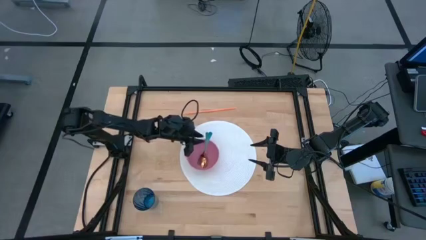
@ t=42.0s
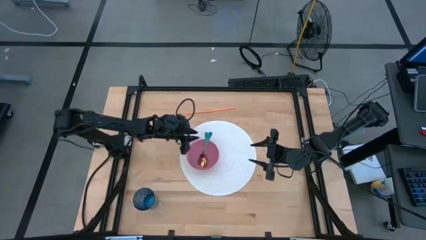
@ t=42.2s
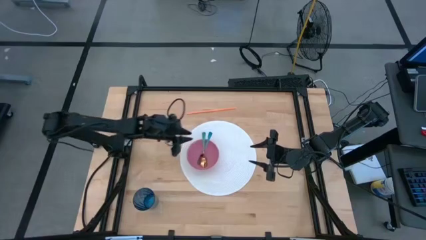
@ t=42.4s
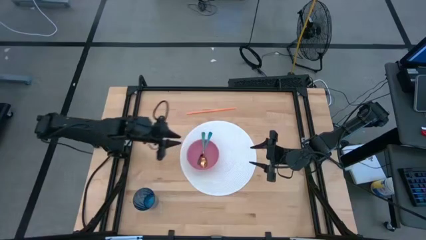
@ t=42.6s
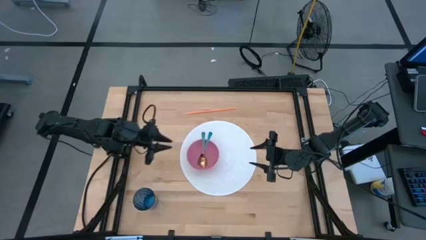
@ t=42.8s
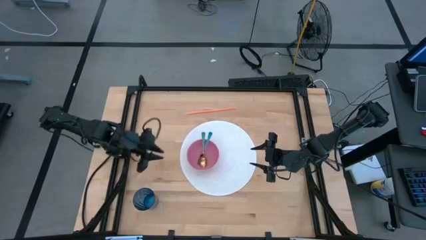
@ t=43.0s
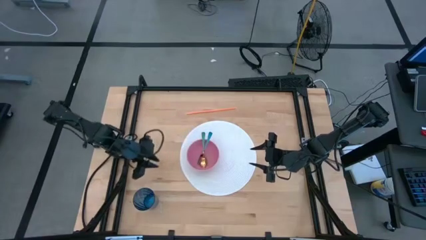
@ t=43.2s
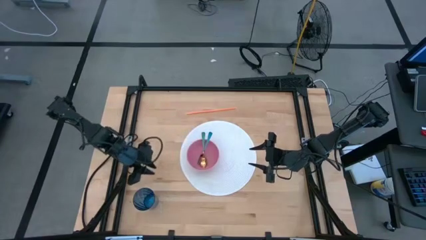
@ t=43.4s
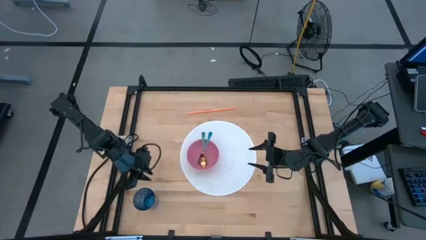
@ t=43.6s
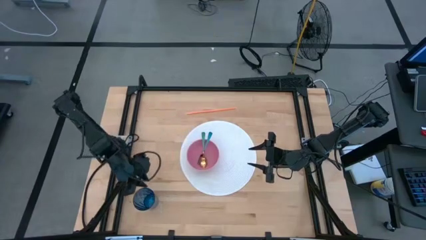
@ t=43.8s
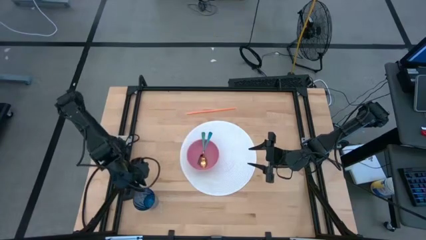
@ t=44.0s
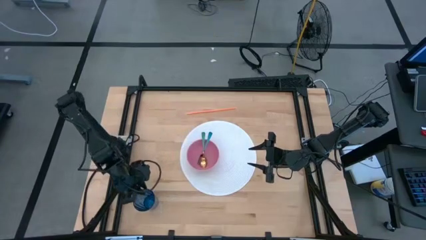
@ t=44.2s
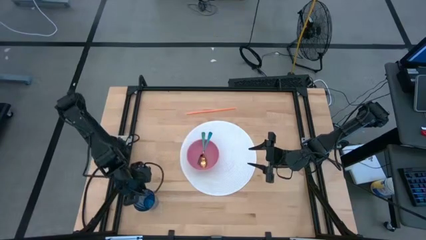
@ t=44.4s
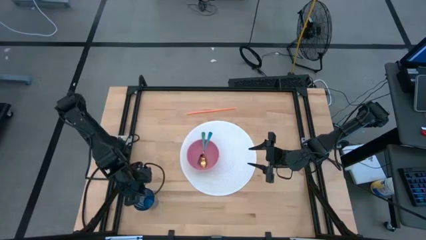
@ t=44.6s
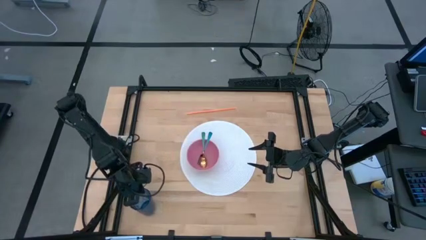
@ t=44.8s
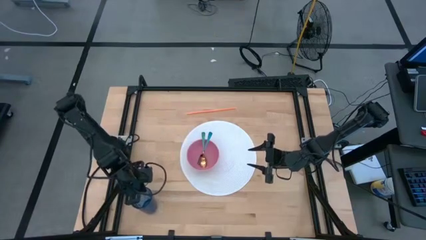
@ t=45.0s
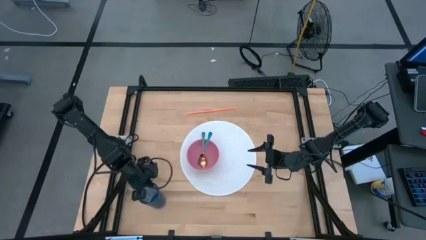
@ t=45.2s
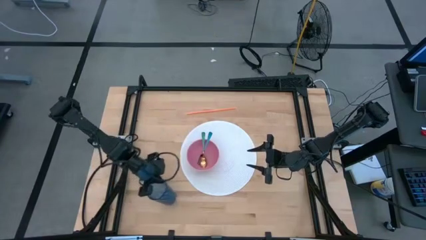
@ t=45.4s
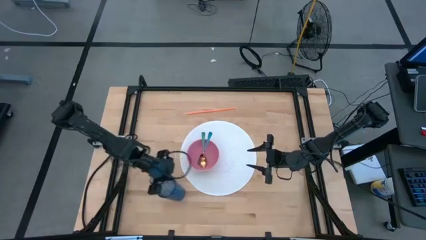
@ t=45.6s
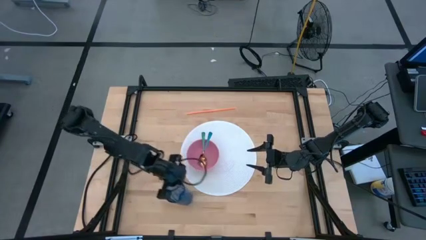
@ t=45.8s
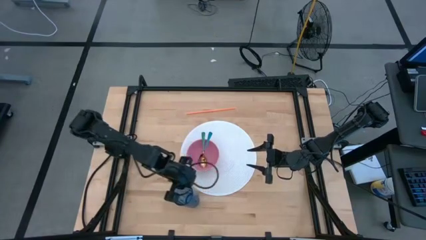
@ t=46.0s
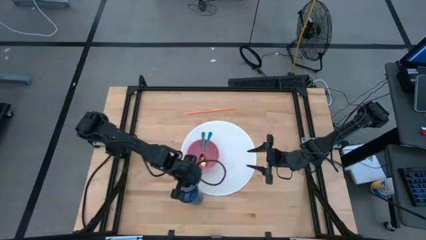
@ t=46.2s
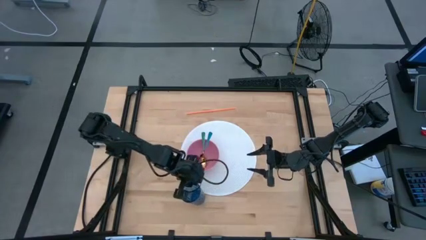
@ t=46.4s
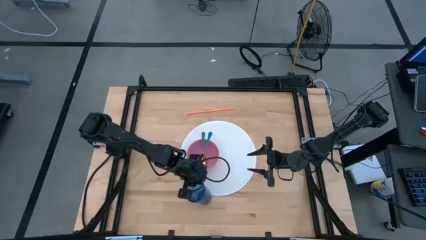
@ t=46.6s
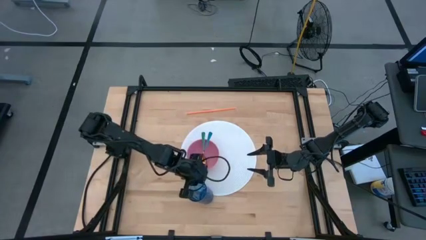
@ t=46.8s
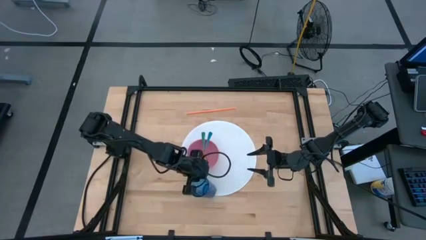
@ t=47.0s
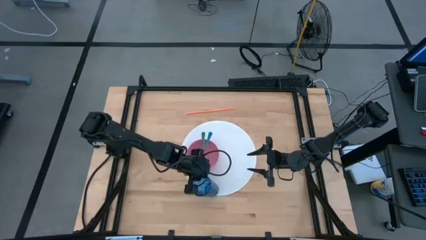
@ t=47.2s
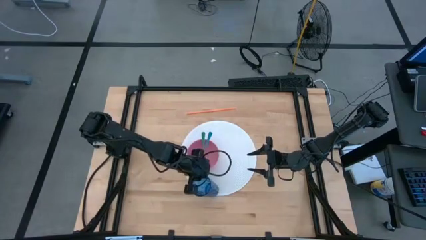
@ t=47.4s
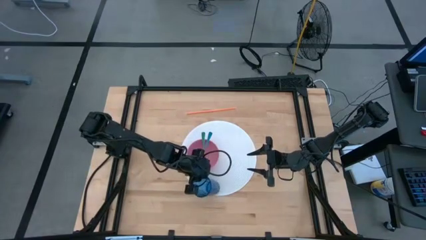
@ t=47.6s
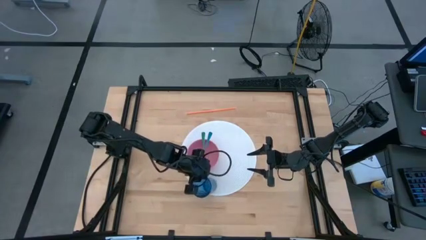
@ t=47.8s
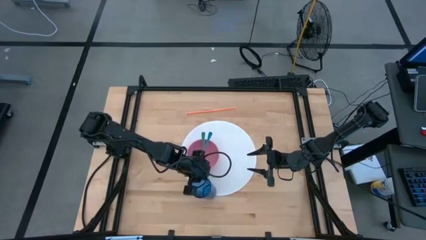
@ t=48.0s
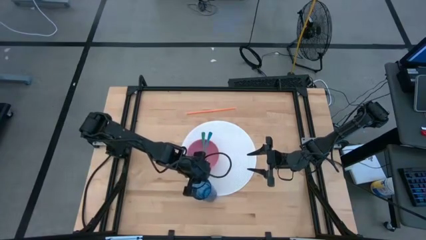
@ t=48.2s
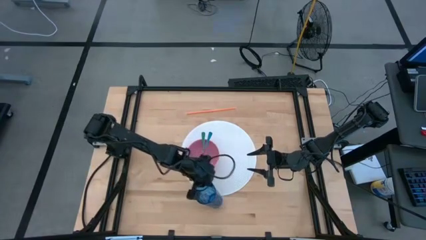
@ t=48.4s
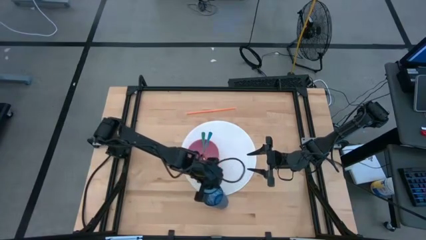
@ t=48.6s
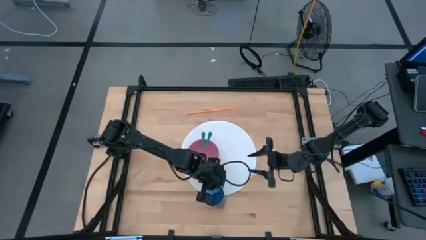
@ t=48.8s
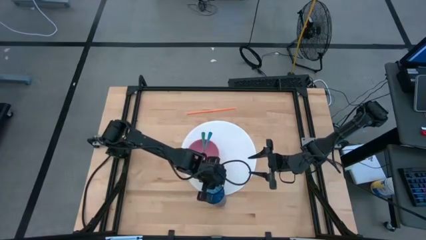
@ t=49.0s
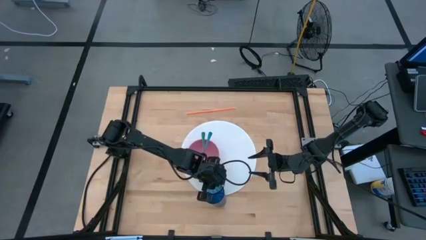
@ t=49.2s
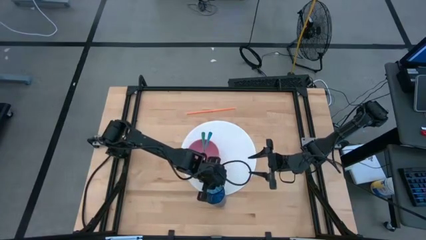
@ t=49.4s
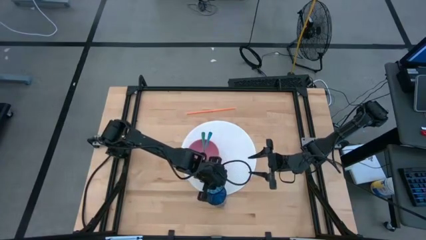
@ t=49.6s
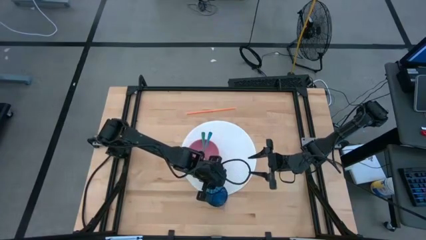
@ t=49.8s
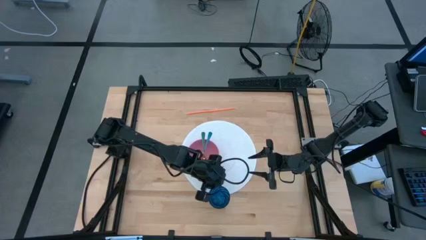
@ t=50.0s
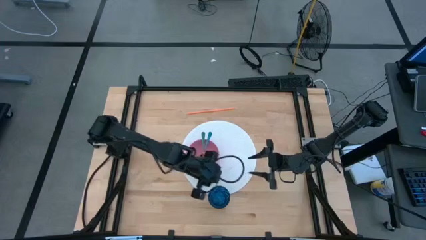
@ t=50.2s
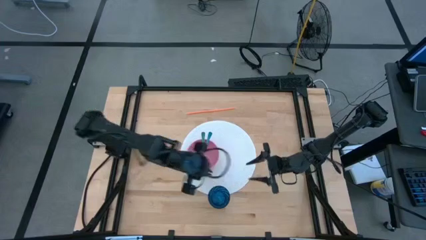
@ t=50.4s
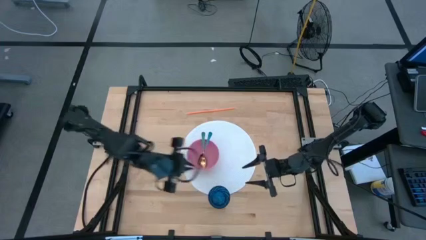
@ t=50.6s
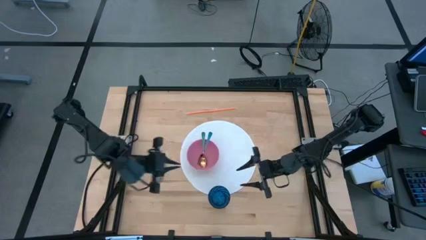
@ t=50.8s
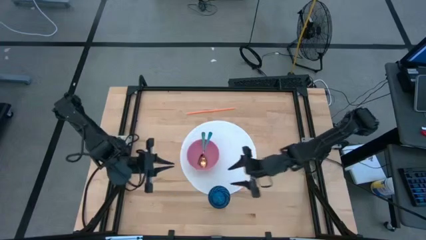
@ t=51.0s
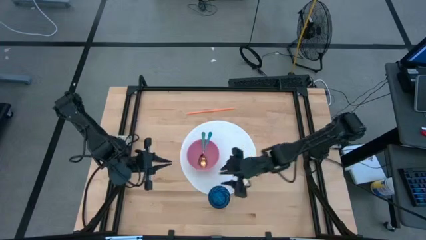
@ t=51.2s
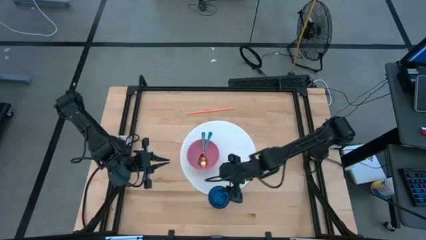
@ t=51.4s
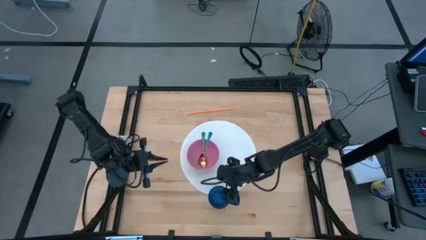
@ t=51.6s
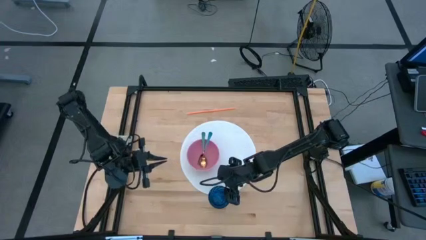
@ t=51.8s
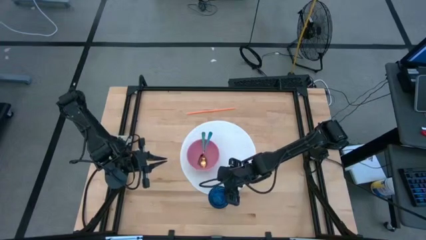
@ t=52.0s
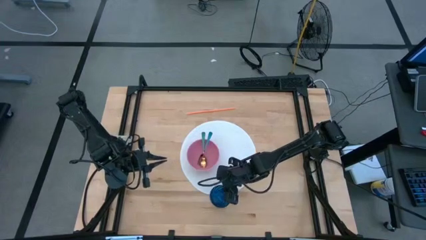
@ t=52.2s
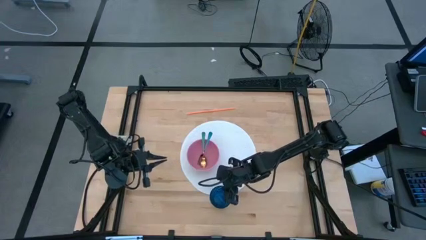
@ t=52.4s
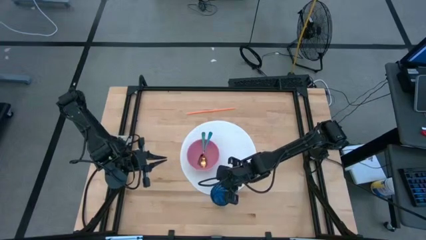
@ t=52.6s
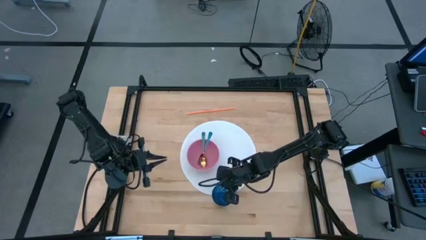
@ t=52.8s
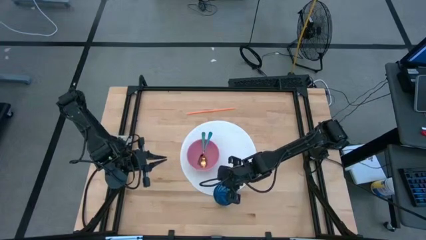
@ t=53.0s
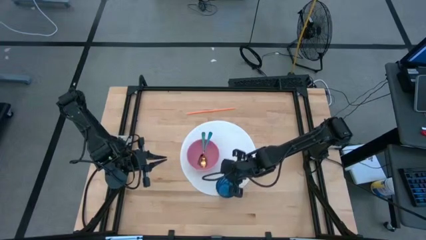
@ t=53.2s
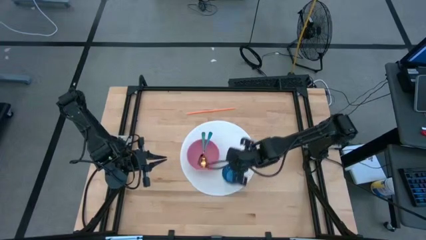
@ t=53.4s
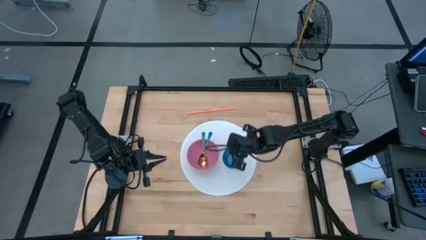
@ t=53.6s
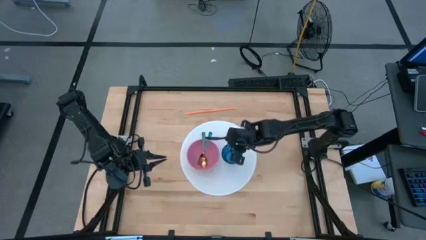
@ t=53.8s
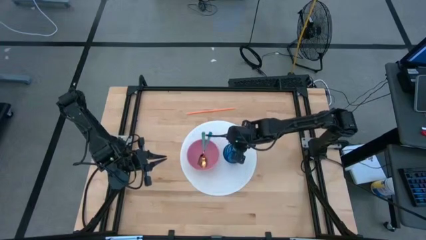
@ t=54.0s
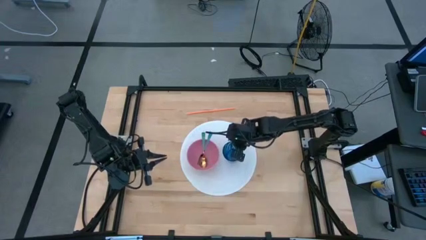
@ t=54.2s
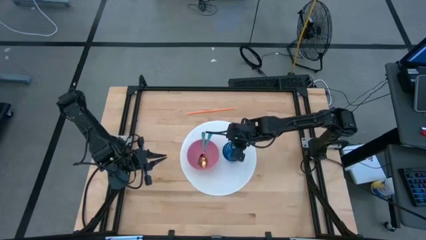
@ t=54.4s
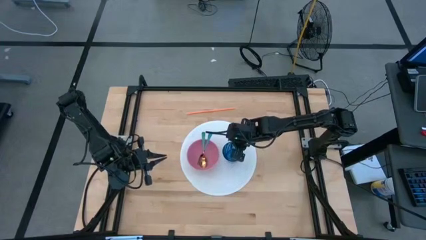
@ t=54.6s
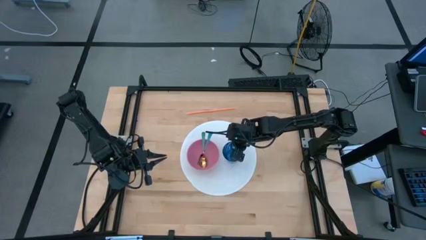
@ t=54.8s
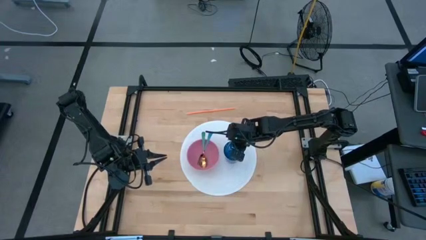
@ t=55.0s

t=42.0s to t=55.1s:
Task: Pick & Place Utensil
Put the blue glass on the white placemat to the right of the pink bowl

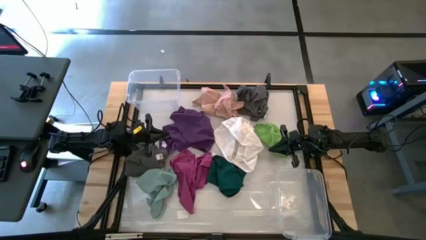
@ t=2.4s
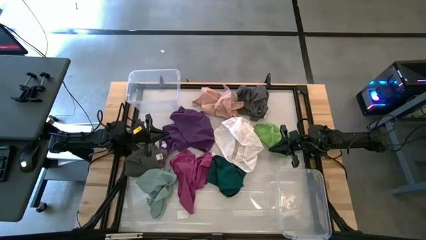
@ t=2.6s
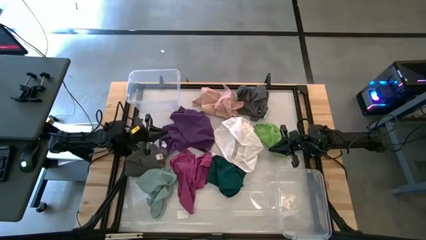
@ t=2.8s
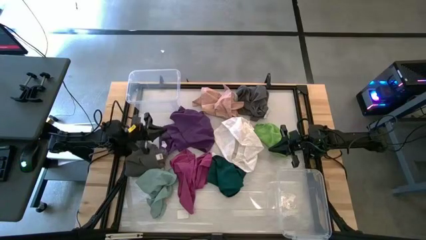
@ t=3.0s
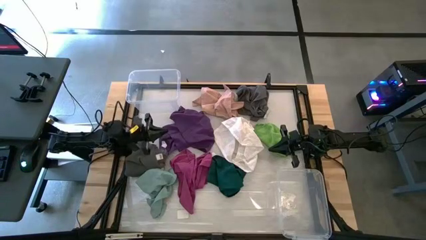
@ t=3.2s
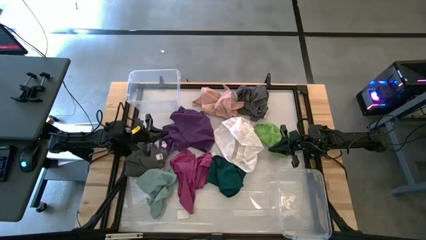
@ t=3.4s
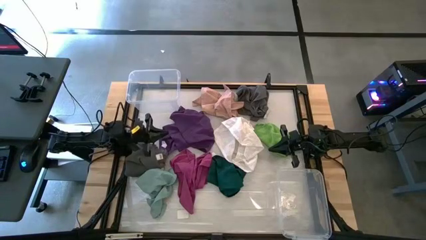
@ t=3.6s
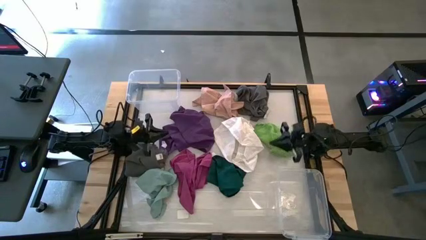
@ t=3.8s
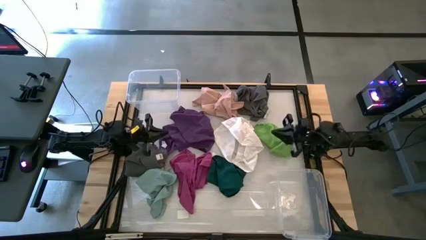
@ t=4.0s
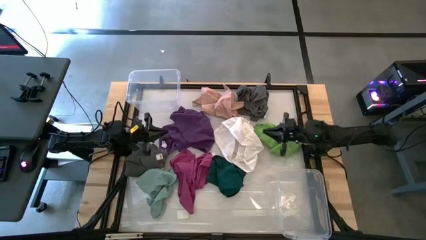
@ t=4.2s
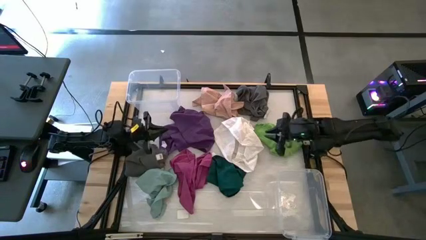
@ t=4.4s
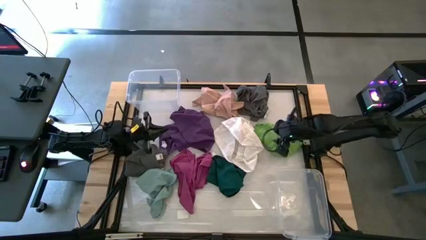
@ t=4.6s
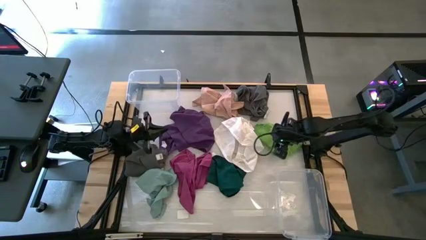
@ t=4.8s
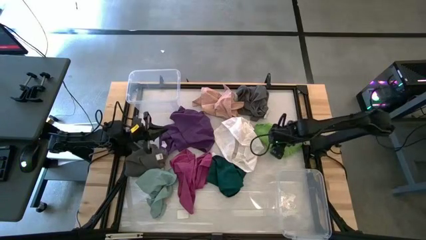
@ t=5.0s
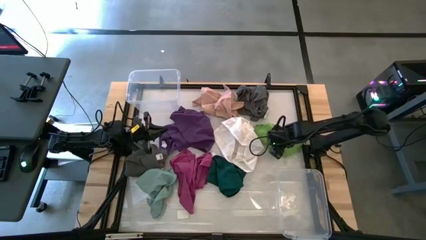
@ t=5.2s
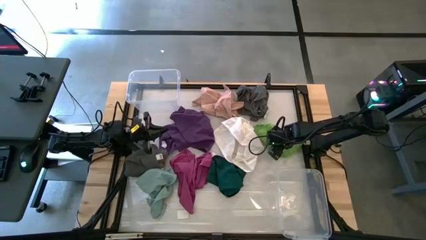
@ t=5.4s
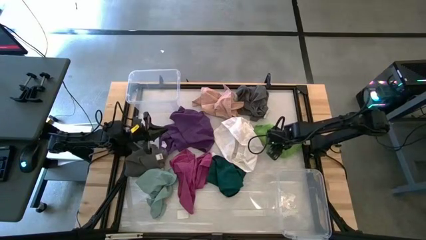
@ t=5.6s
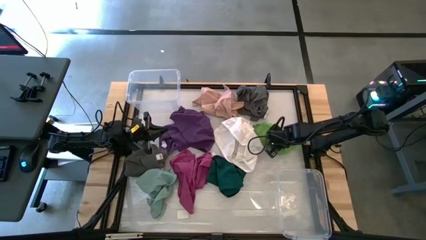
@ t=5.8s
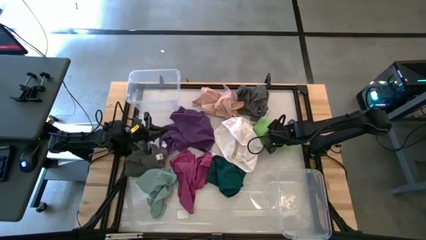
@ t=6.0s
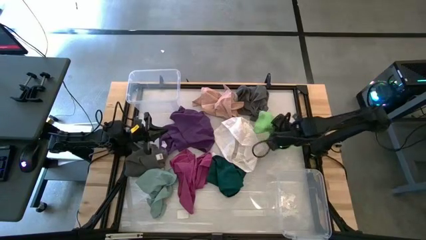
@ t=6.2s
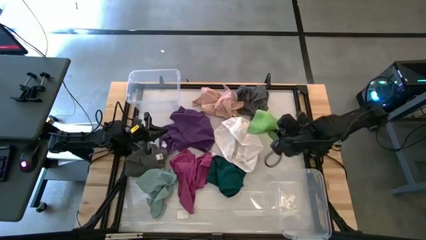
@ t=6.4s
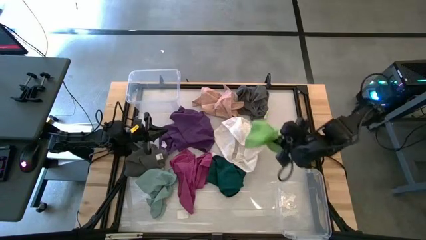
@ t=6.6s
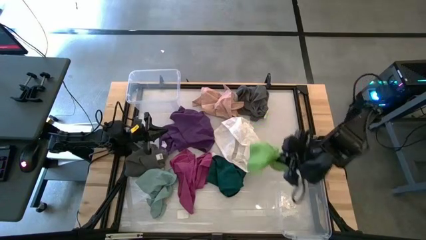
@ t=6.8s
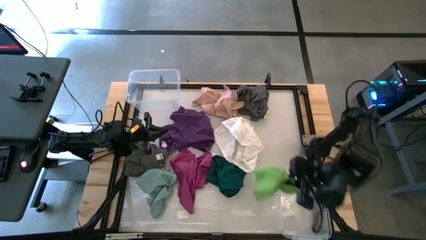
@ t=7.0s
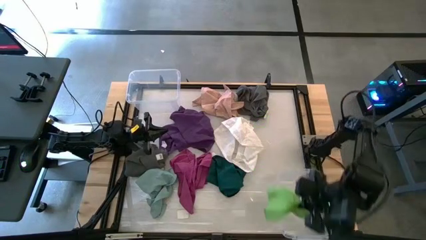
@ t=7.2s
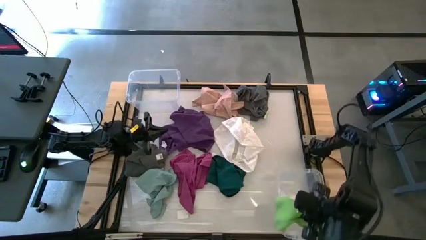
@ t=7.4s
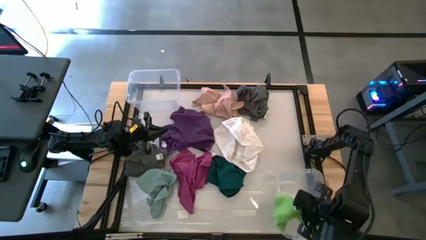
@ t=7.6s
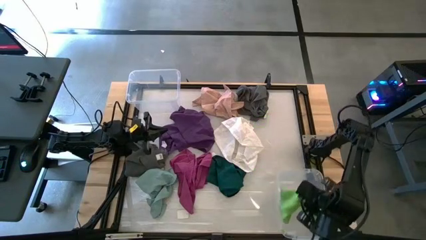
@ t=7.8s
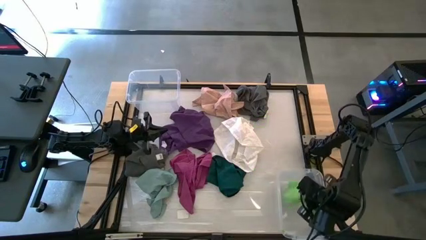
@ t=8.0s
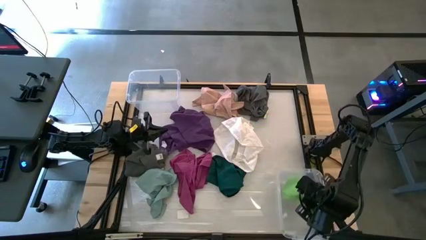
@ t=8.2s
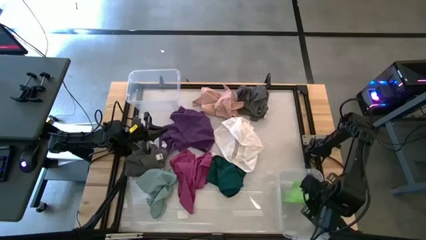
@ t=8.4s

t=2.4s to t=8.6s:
Task: Sort microfiber towel by color & place in baskets
Put the green microfiber towel into the bottom transparent bin
